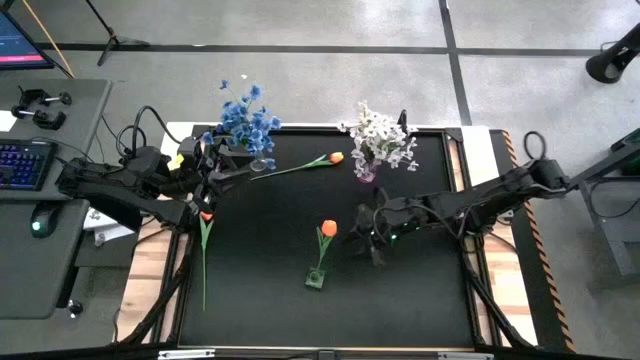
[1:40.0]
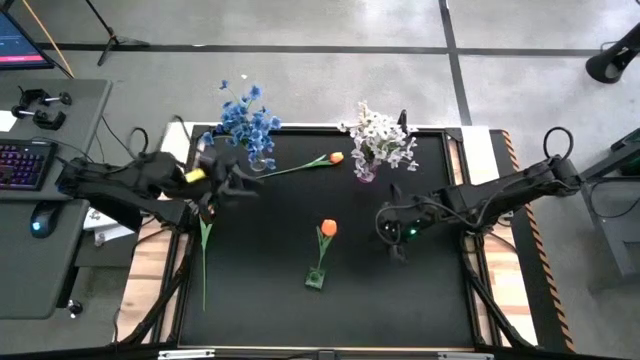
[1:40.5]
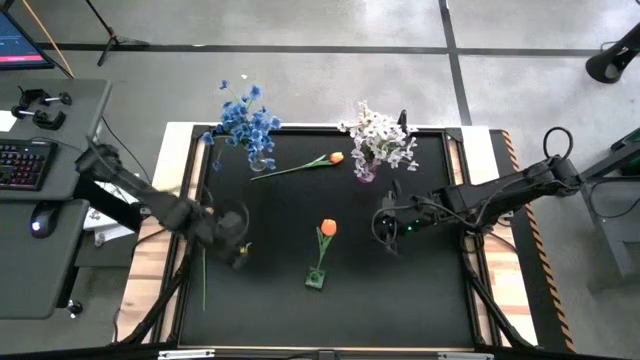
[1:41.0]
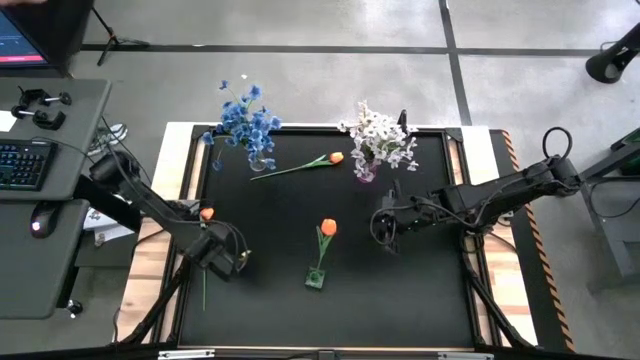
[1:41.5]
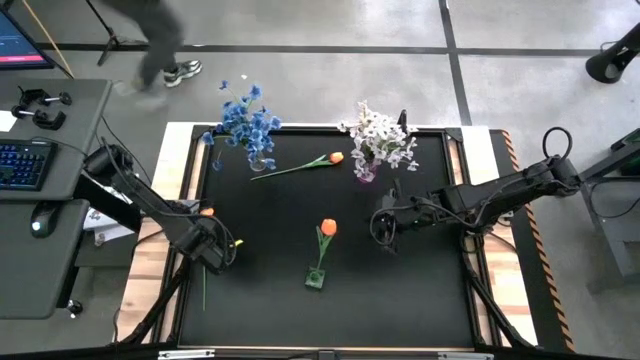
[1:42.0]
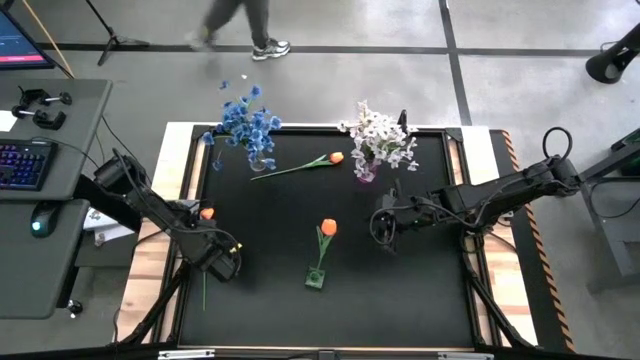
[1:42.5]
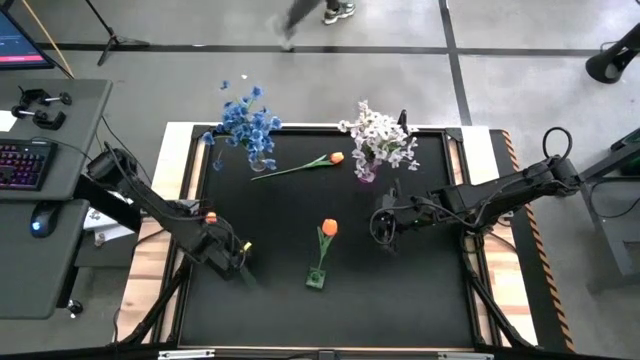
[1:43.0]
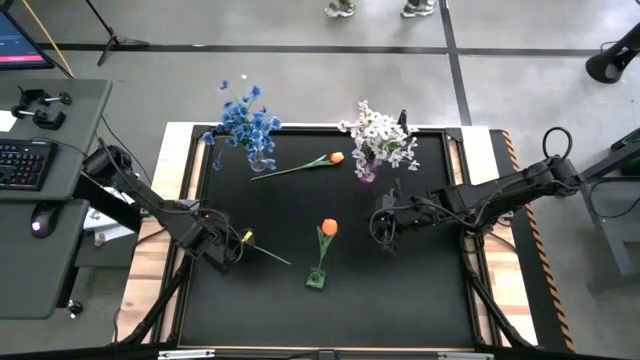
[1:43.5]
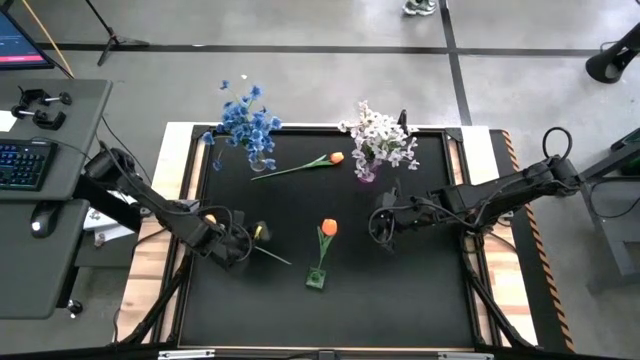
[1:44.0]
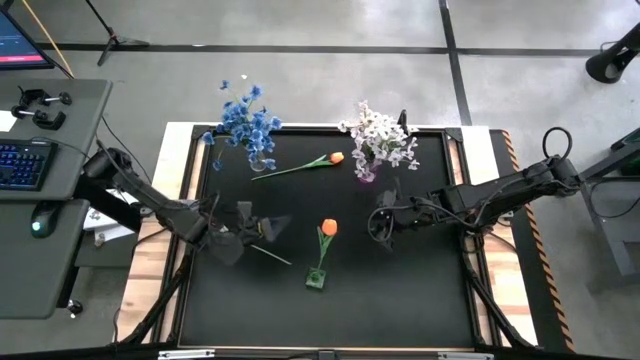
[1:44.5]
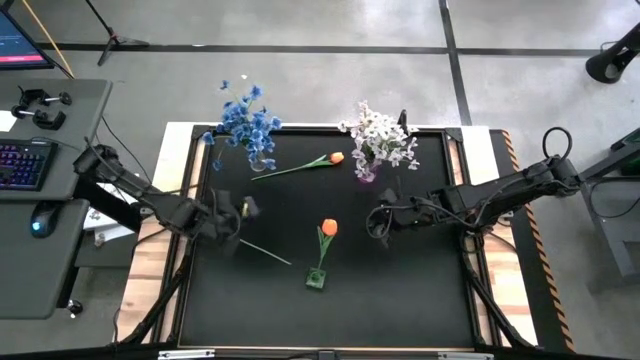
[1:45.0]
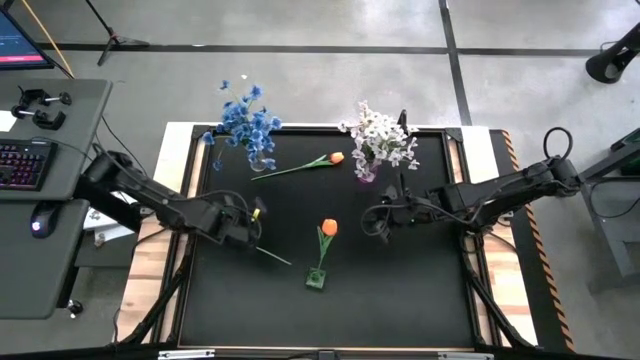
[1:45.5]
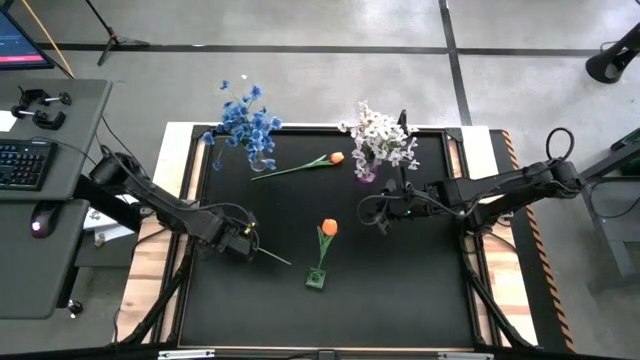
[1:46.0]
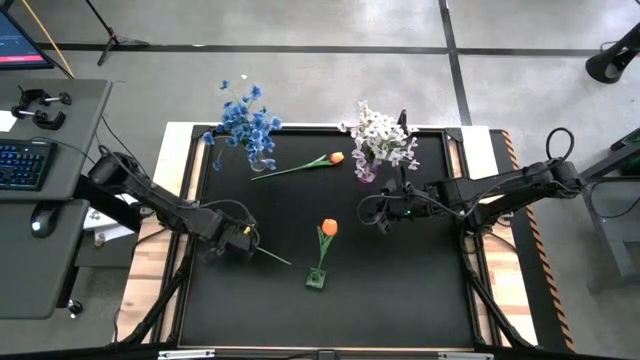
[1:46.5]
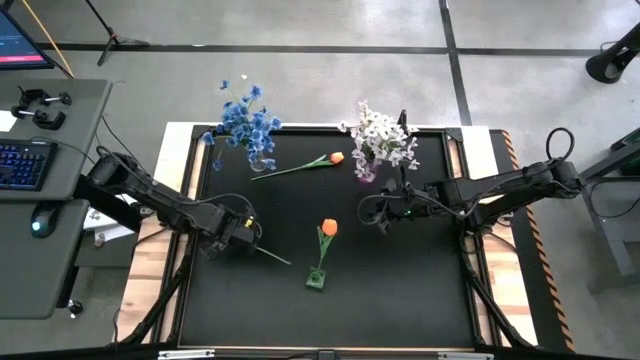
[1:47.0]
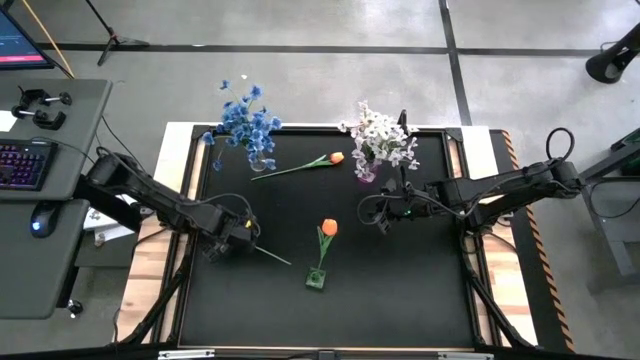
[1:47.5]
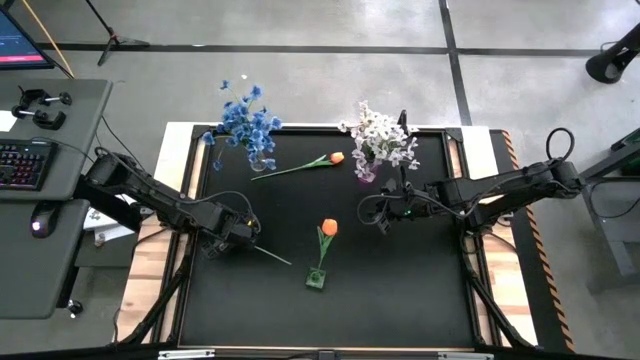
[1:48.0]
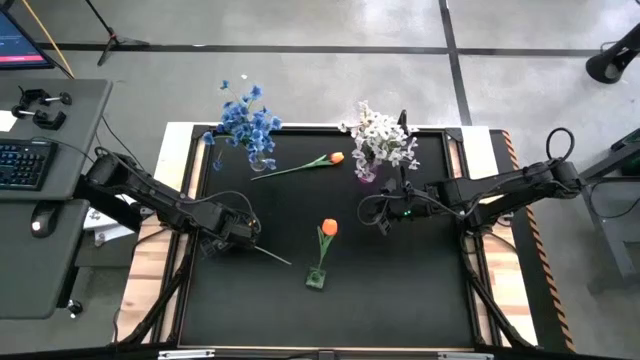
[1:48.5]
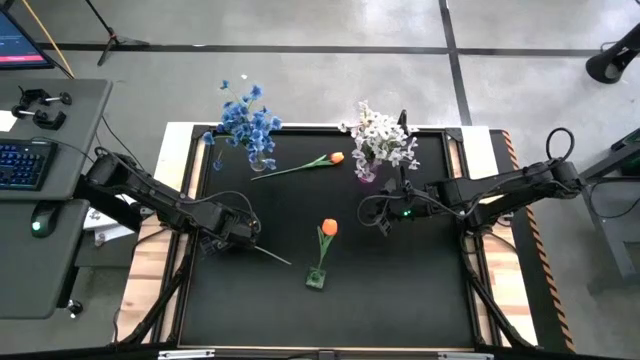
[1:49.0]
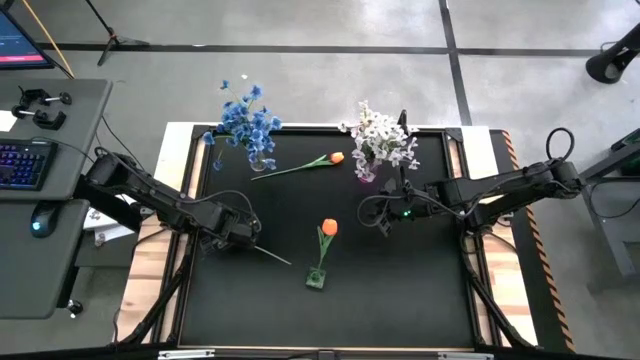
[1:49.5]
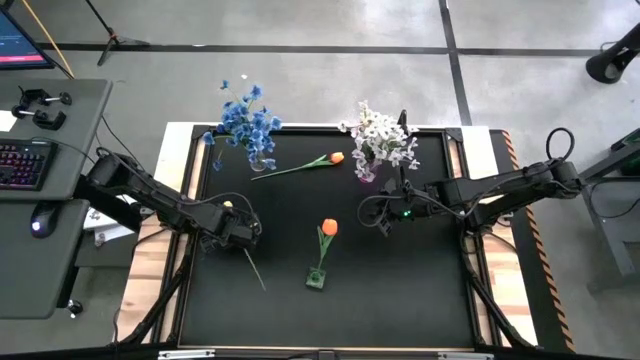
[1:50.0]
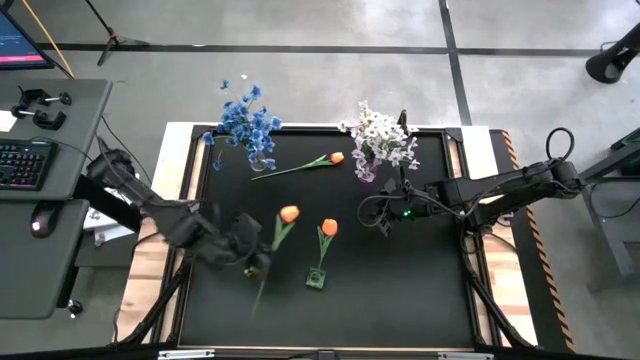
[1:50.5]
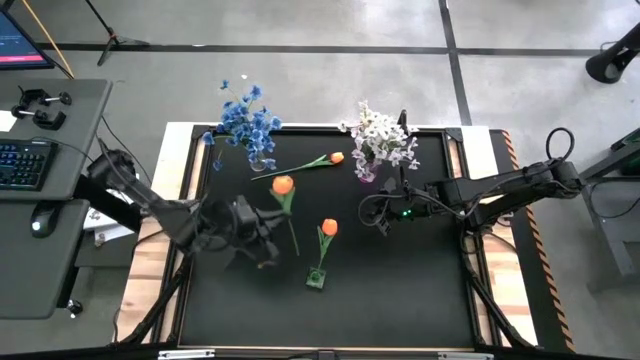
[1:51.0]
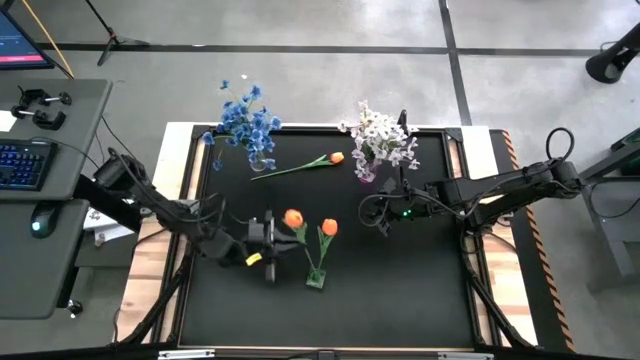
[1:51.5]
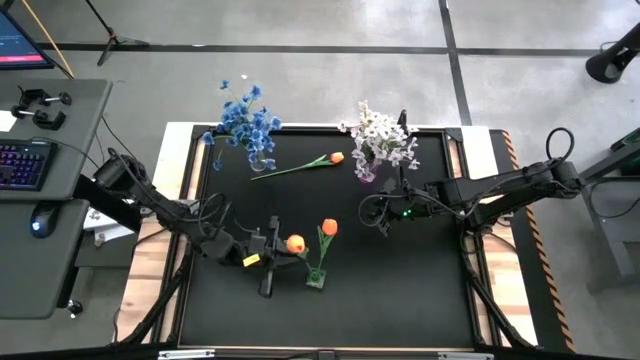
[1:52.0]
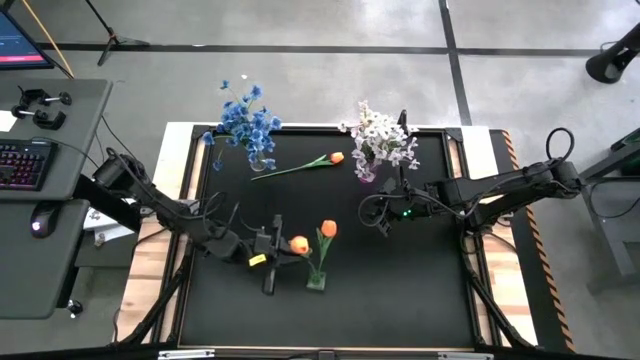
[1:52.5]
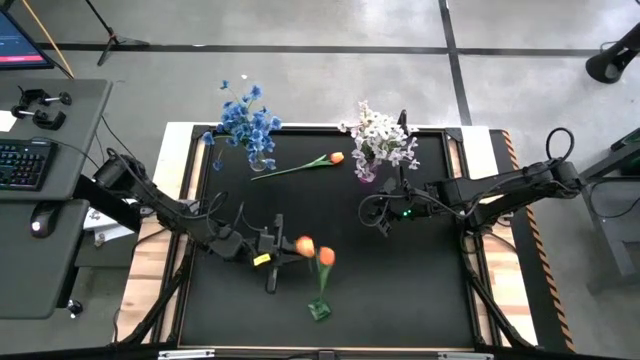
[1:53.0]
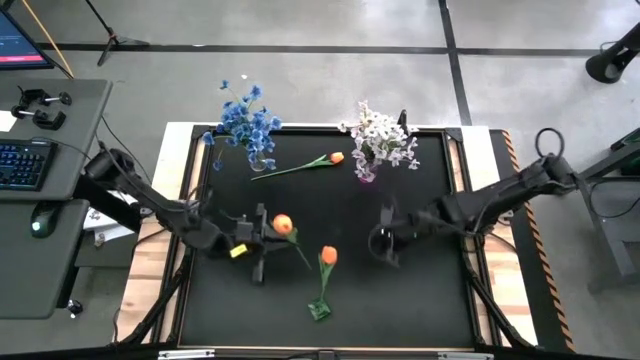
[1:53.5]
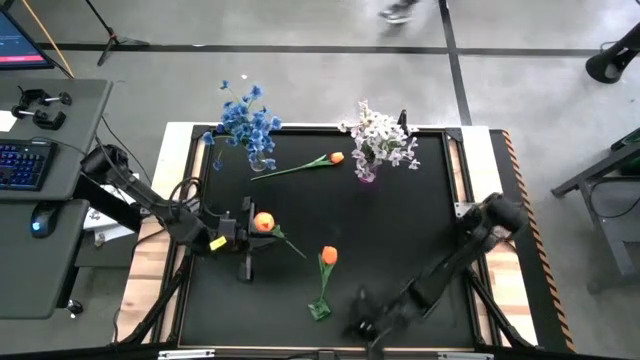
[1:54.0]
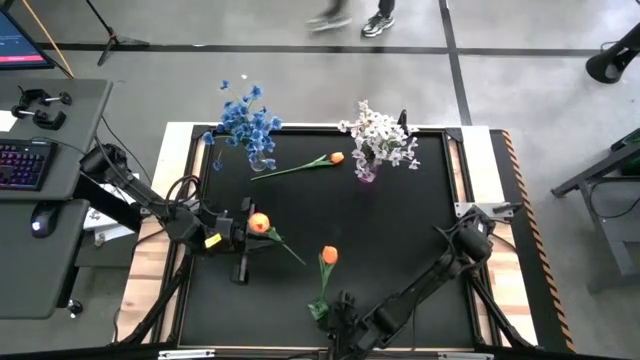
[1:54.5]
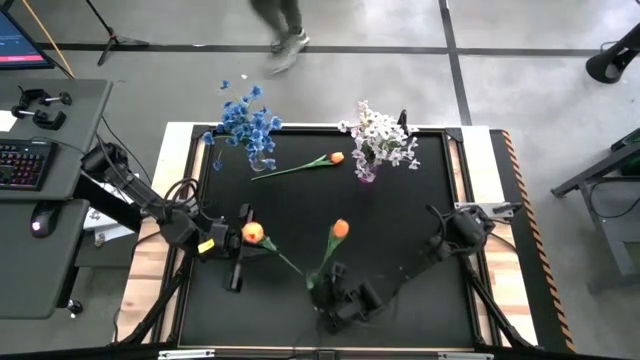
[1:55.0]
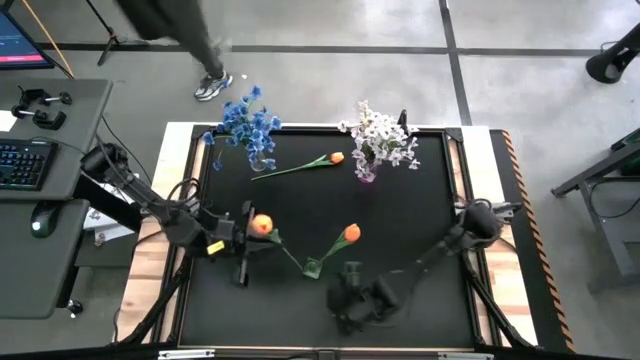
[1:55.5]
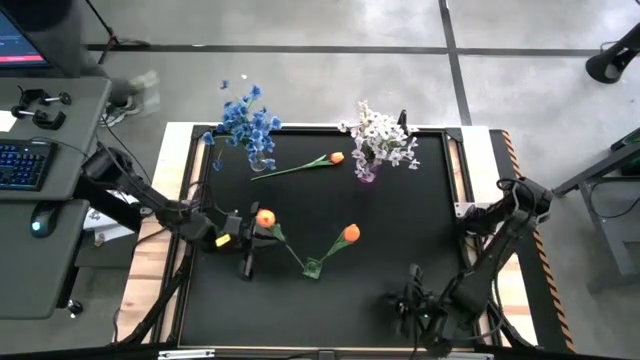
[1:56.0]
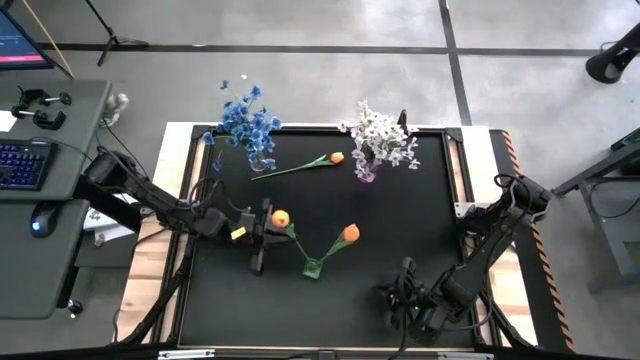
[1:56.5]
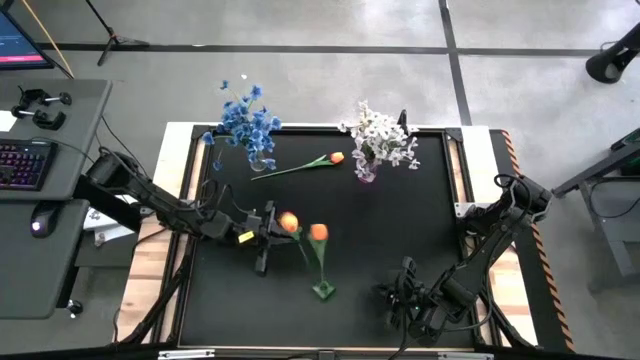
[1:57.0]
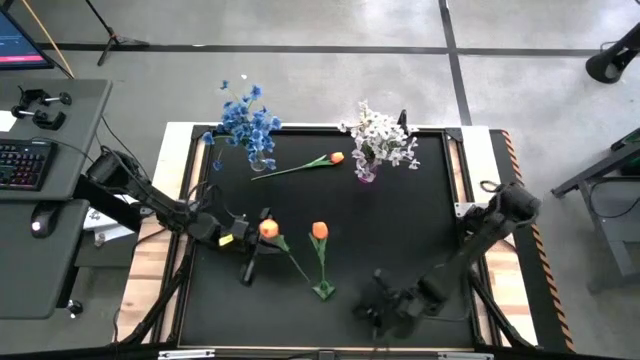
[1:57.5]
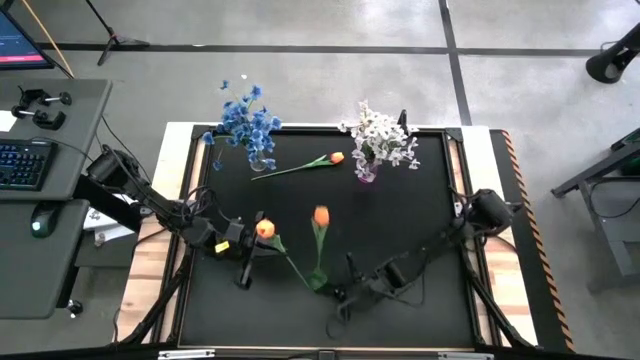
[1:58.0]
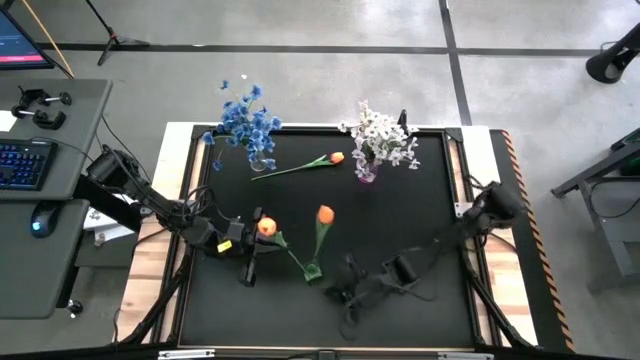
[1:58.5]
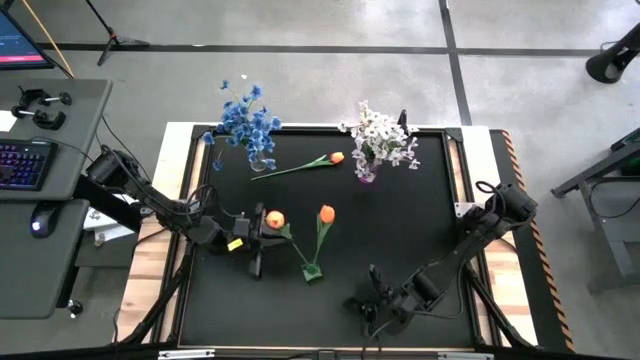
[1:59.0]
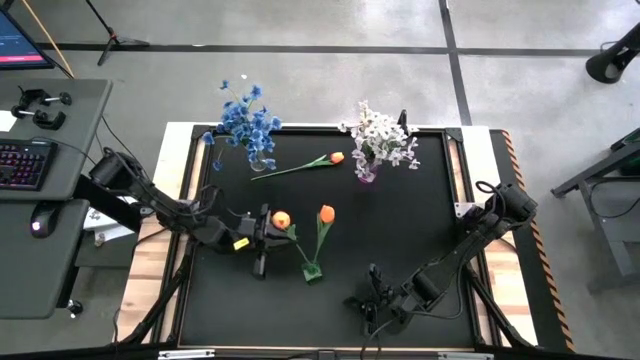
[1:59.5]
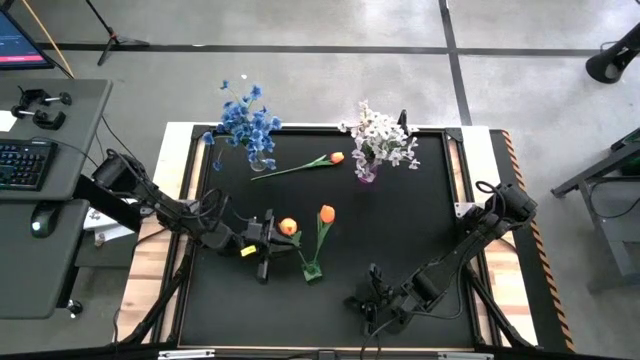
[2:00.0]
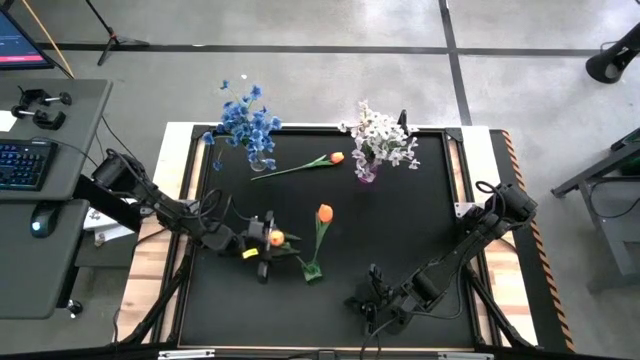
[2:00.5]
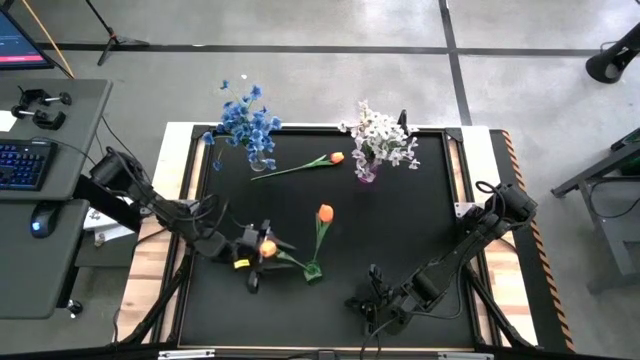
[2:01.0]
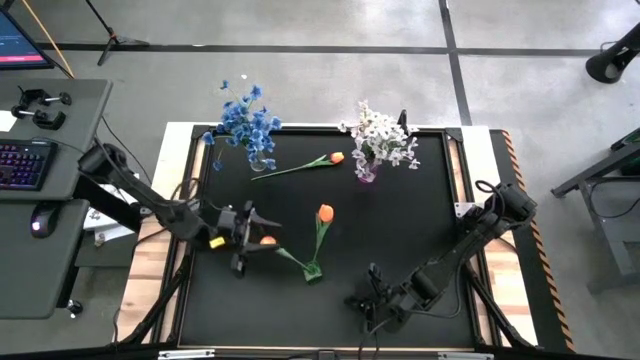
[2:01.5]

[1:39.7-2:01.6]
Task: Sort flowers into vase by color
Put the bottom orange flower into the green vase
